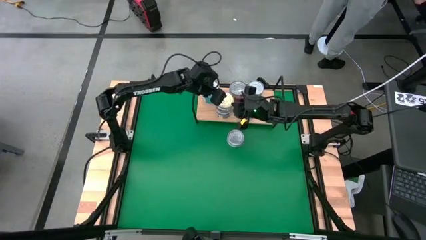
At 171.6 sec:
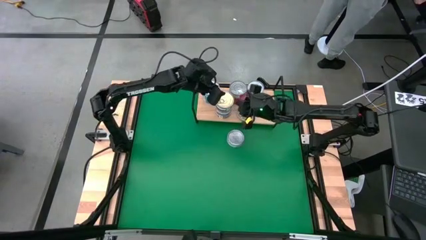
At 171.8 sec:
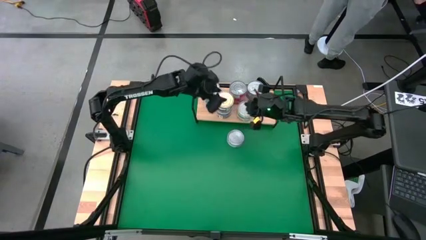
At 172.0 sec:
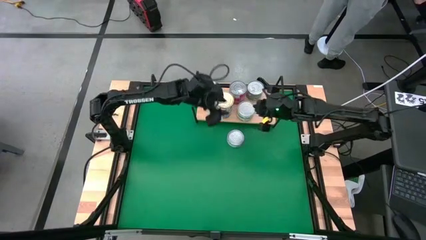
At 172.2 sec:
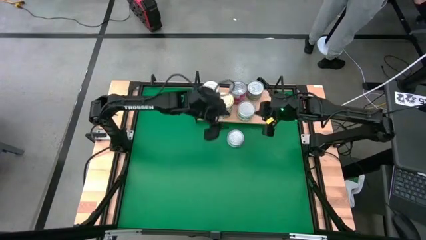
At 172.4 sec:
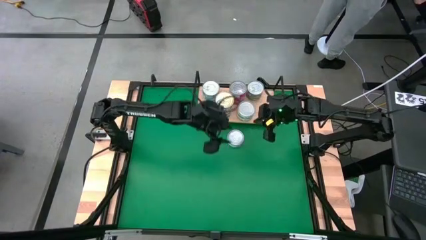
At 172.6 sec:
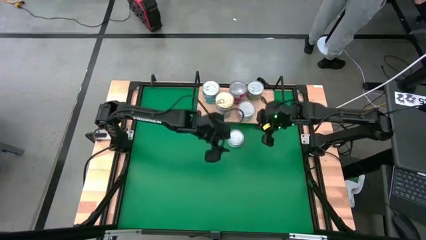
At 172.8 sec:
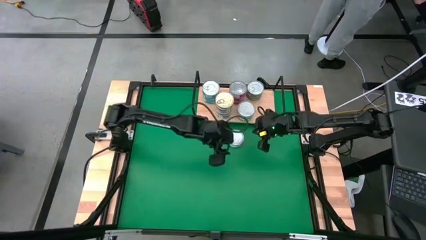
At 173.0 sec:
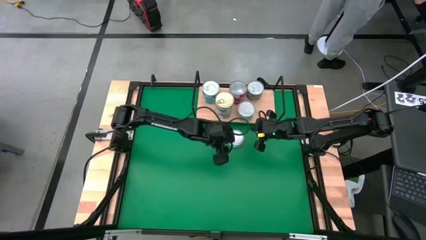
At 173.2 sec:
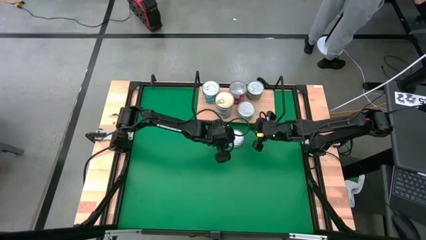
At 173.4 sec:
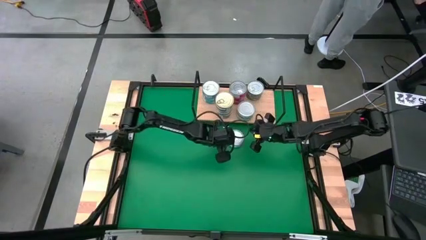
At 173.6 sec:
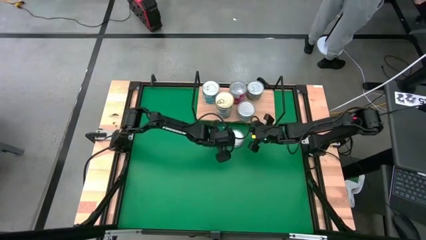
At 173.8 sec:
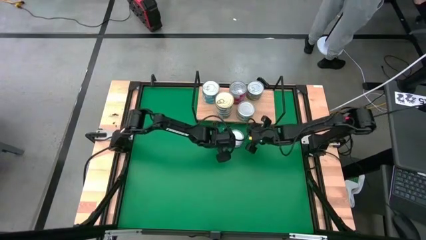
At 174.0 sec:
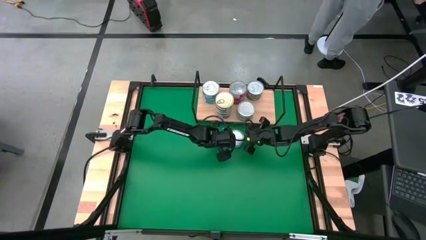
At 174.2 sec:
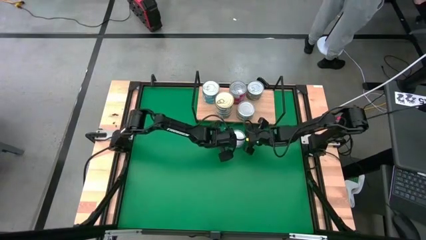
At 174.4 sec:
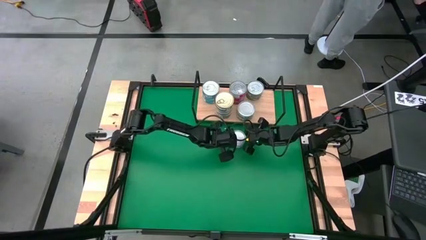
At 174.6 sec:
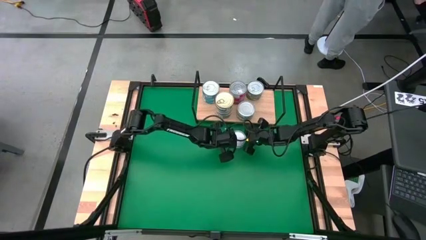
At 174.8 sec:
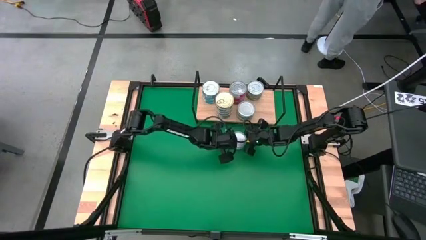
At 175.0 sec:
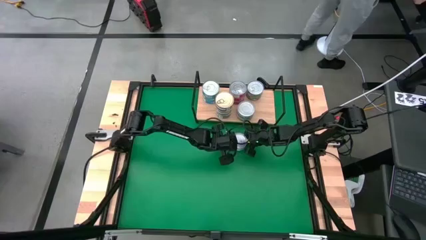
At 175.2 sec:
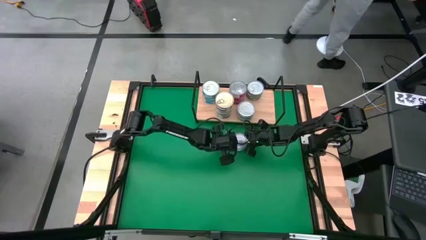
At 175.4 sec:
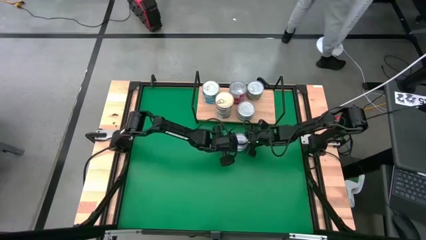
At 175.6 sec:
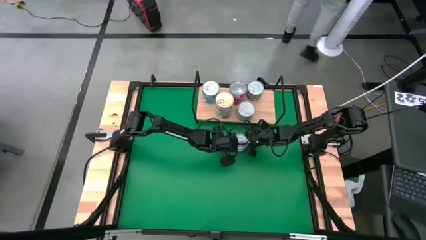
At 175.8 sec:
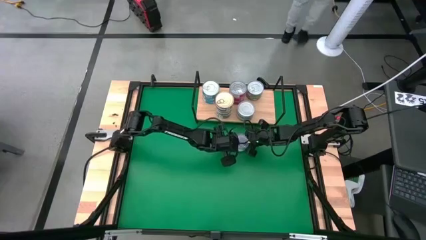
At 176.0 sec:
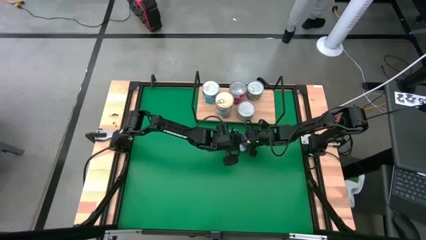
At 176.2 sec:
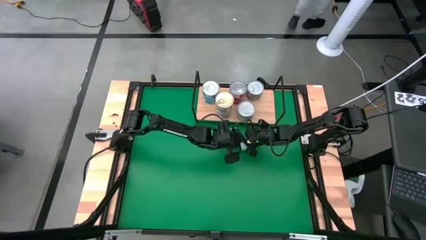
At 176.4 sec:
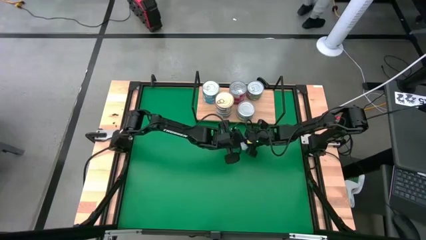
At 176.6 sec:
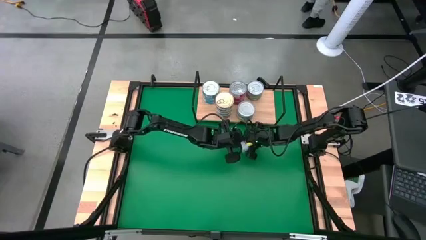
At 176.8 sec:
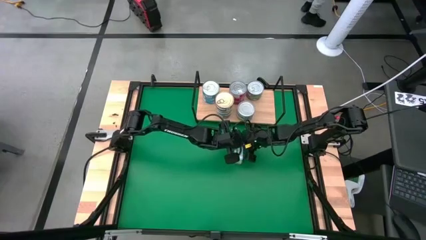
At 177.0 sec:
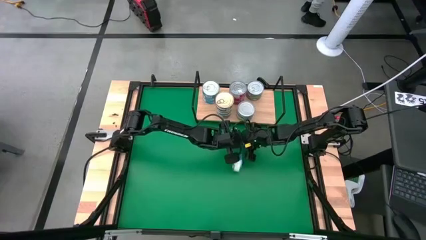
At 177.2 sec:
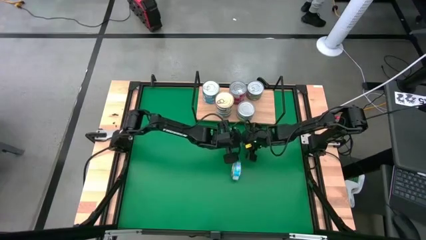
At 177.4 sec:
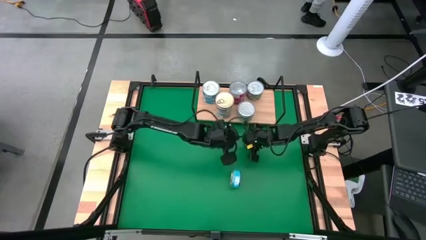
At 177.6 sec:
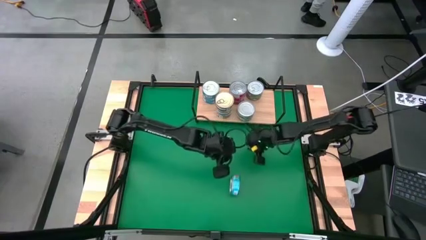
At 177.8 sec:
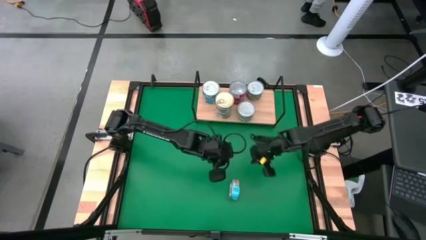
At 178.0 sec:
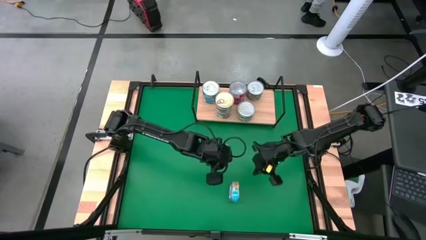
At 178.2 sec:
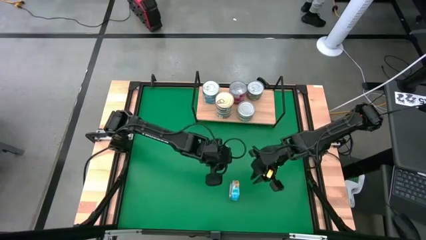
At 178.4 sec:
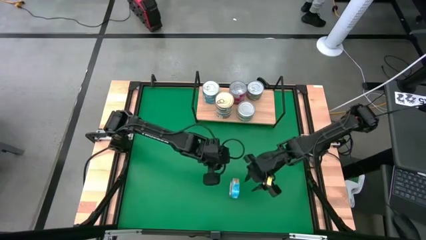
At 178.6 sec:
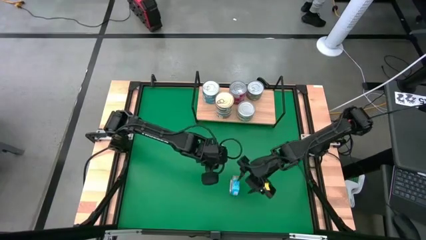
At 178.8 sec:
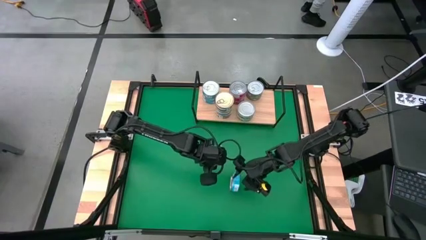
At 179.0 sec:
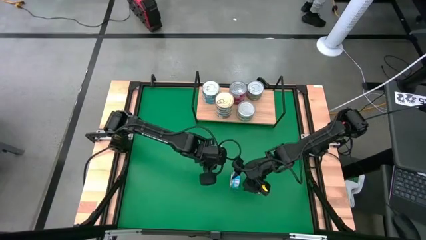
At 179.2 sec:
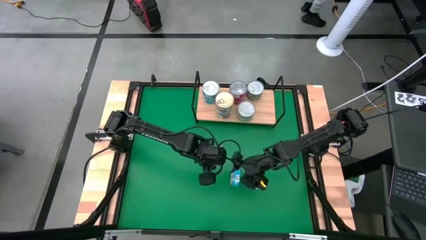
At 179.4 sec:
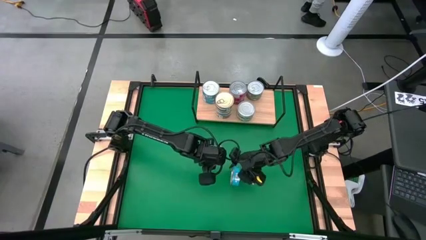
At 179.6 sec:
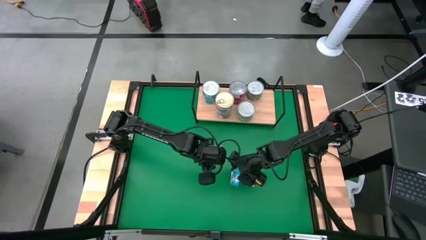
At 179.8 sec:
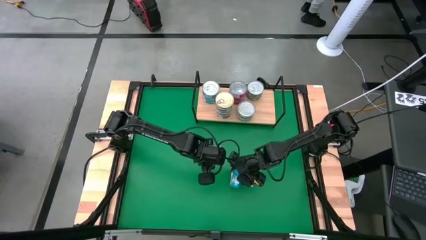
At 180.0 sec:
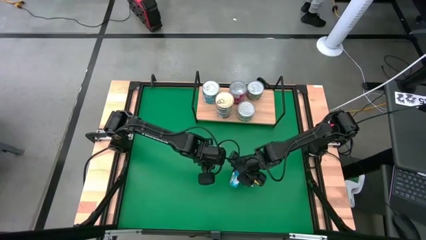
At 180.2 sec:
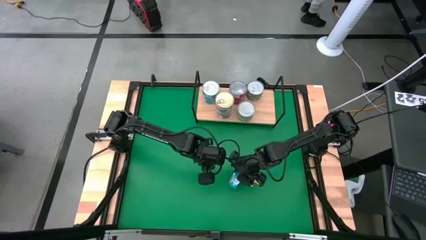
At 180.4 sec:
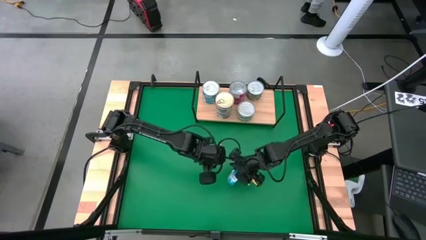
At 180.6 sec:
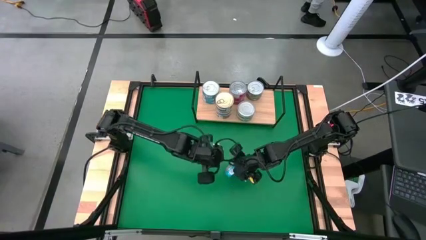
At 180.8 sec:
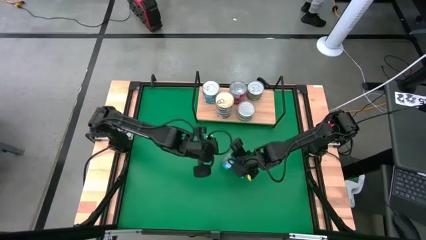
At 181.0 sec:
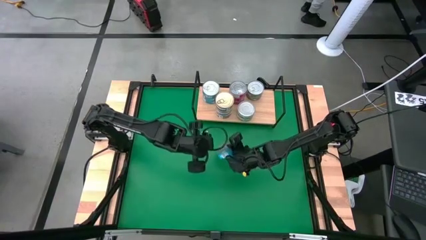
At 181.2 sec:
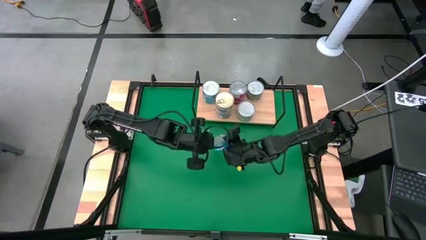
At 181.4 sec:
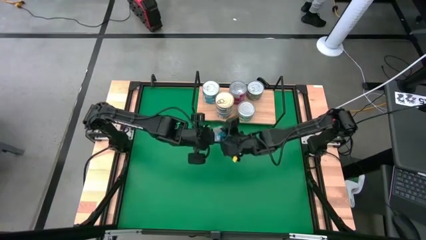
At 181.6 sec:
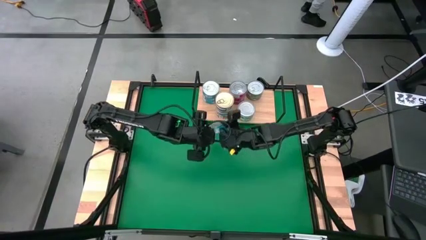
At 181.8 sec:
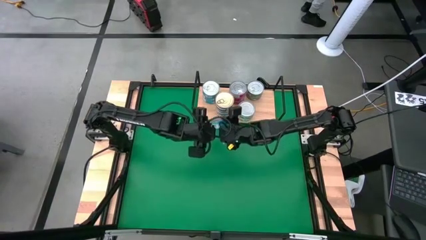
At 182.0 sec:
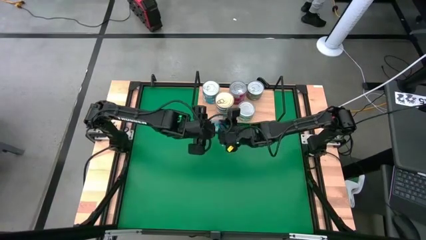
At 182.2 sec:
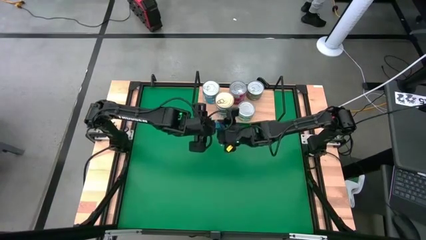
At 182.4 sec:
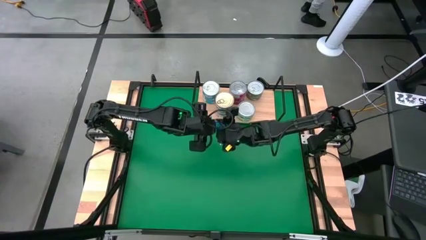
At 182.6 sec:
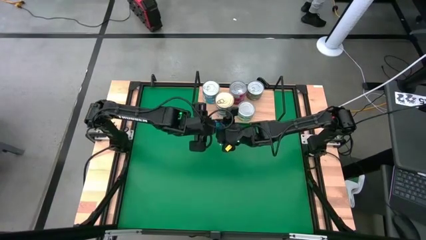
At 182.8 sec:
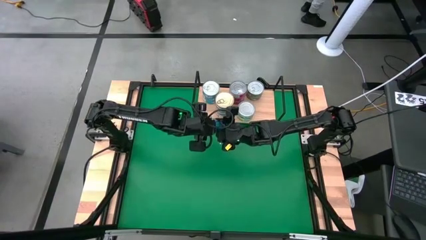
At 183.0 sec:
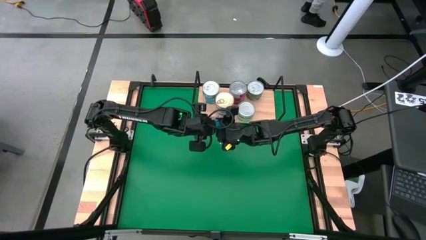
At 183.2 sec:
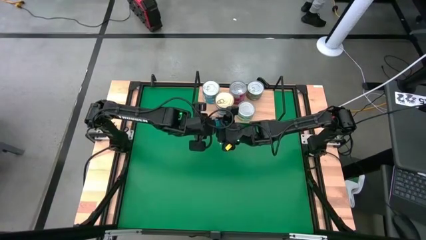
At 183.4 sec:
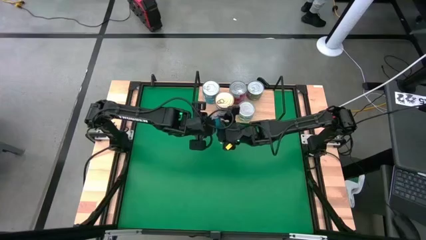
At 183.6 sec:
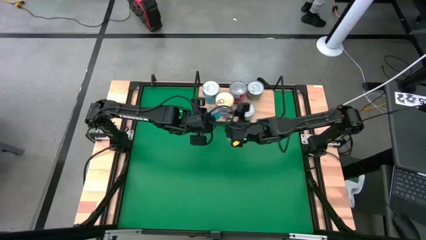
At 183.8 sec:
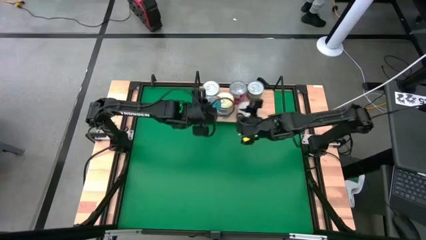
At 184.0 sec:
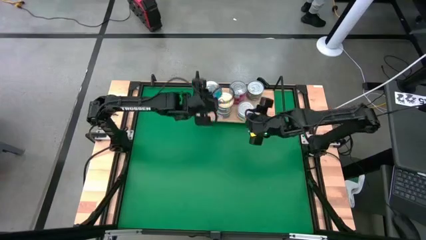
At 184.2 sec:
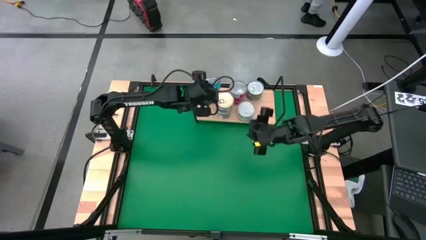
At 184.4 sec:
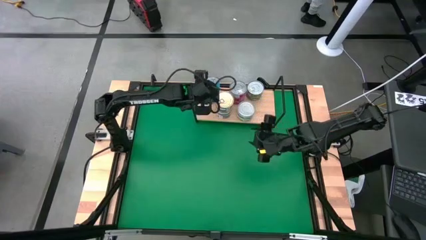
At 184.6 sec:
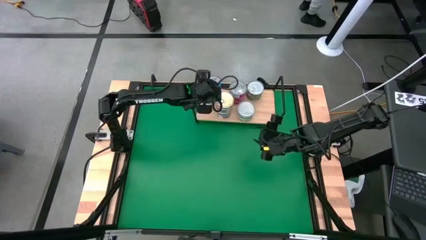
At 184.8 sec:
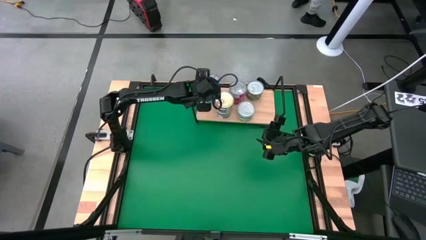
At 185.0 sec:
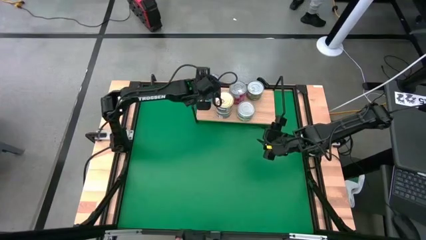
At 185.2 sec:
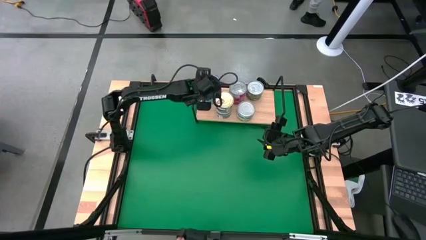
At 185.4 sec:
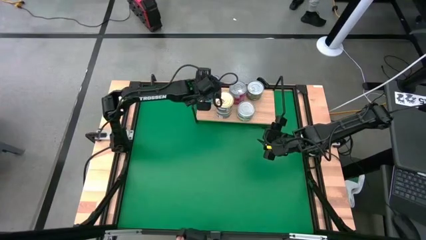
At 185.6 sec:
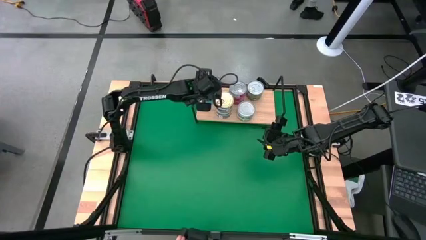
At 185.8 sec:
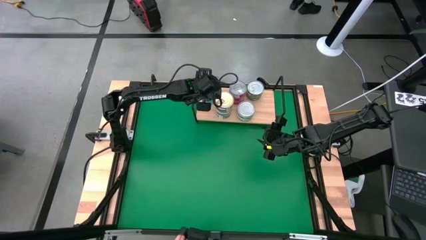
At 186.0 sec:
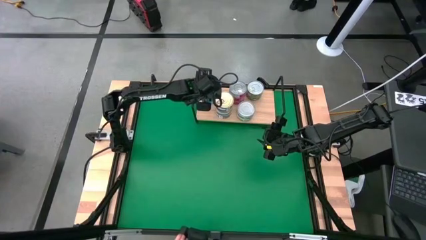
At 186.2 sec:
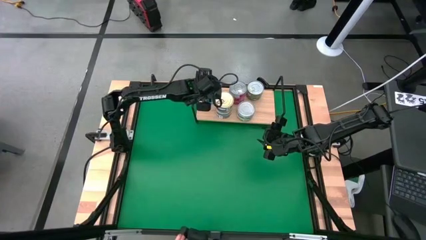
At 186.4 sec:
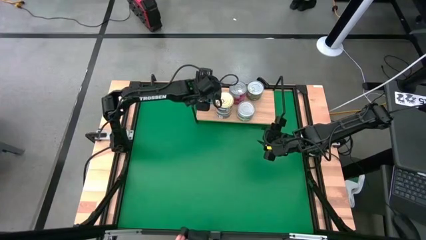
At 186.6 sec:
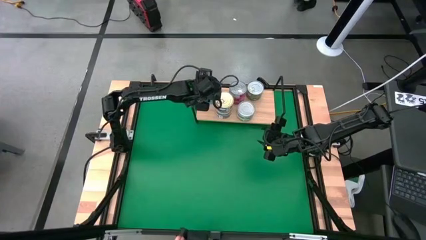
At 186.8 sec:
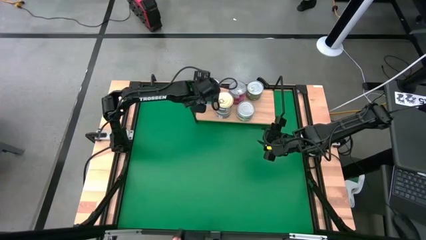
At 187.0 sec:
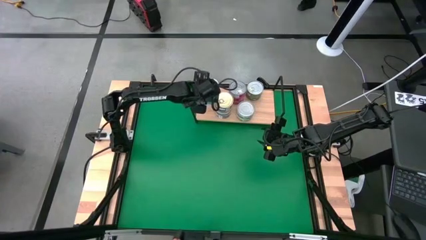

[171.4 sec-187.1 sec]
Task: Stack canned seafood by type on shelf
Stack the yellow blue tuna can on top of the yellow blue tuna cans on the shelf

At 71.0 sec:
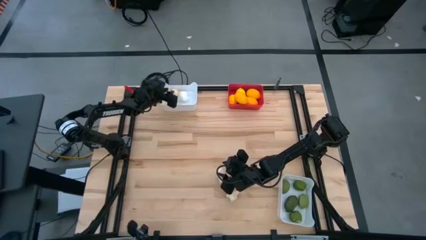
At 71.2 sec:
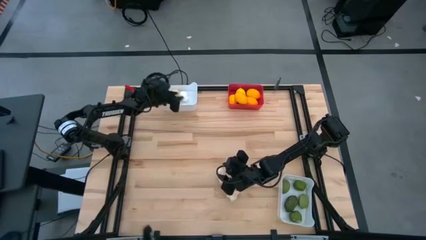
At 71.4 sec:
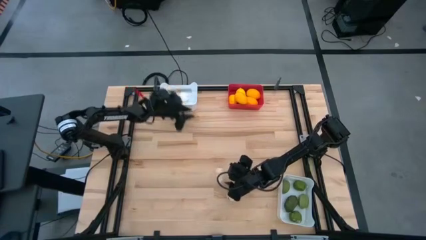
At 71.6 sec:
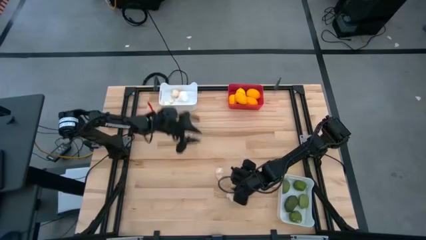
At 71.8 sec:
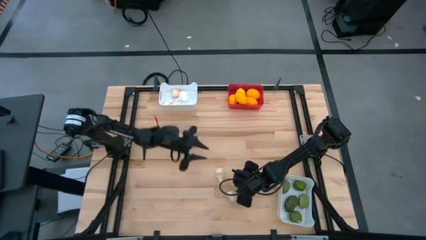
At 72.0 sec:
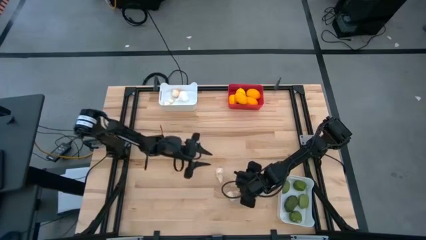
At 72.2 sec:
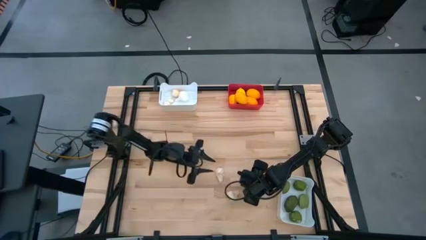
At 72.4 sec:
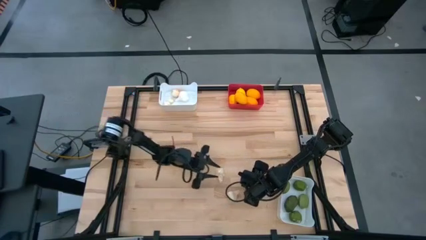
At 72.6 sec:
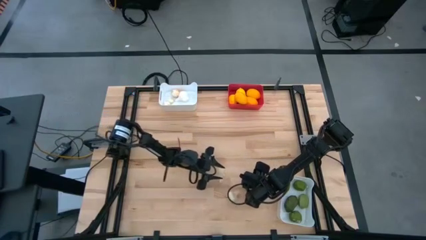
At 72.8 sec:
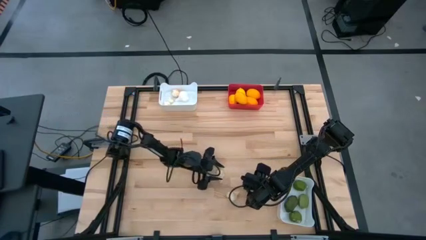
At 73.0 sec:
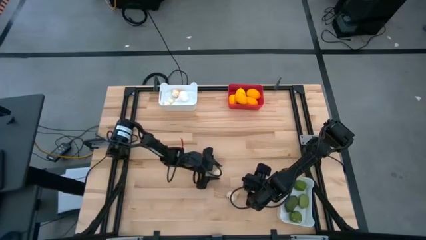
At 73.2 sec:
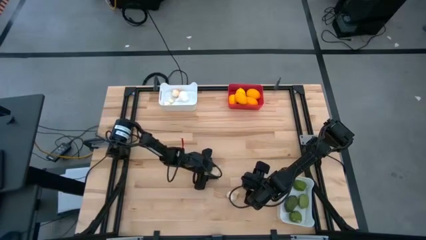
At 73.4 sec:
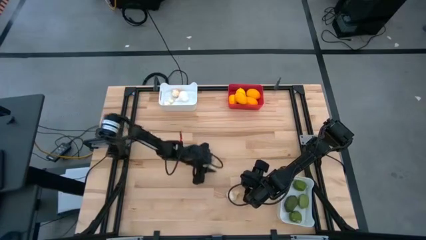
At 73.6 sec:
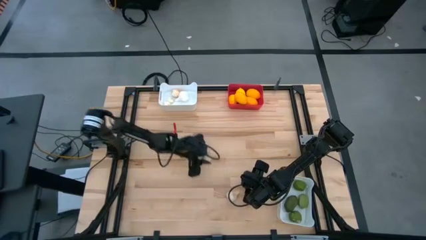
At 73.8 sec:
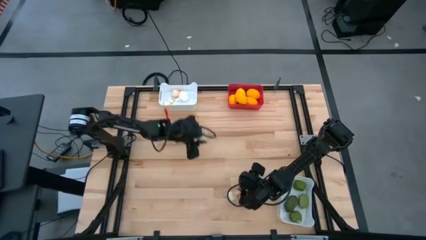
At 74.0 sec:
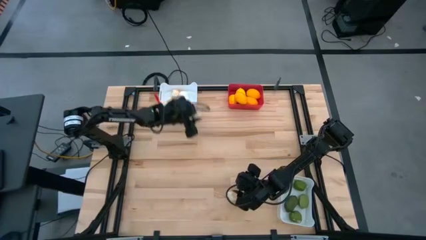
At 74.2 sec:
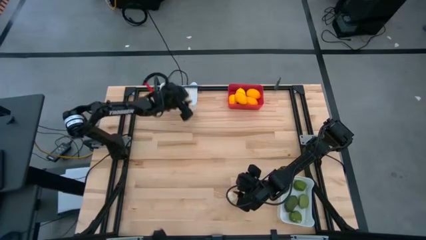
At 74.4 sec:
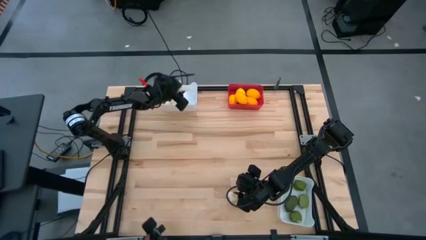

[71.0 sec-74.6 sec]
Task: Sort produce into baskets
Put the white garlic into the top white bin
